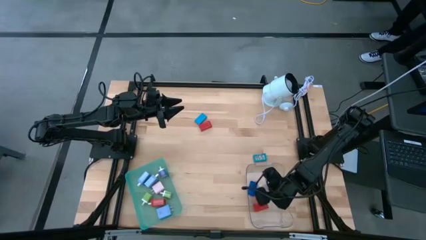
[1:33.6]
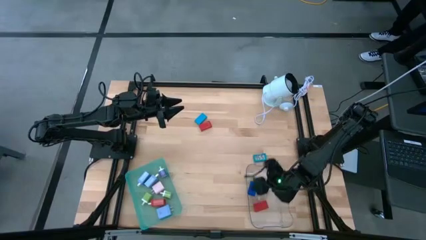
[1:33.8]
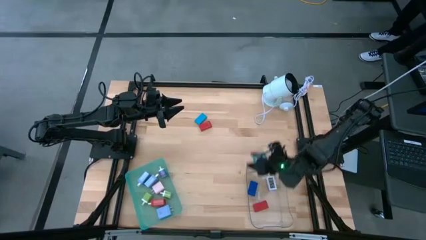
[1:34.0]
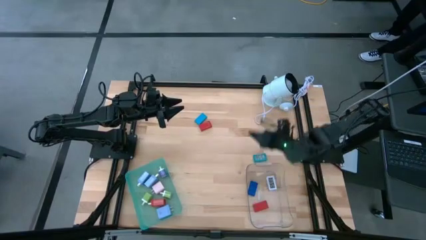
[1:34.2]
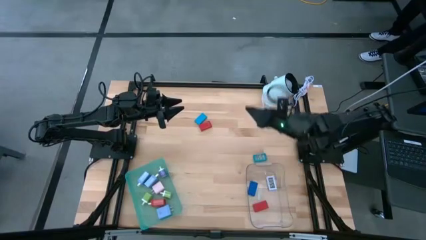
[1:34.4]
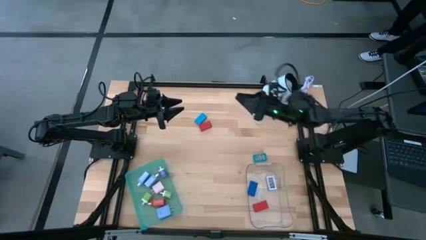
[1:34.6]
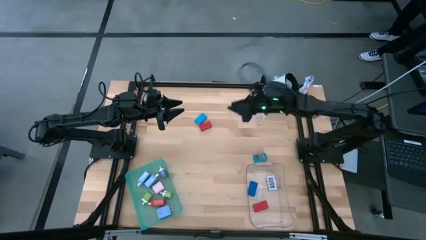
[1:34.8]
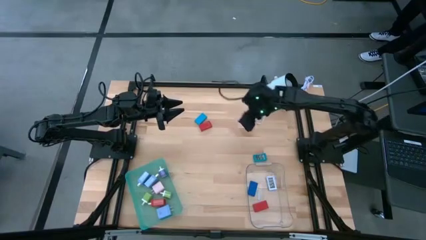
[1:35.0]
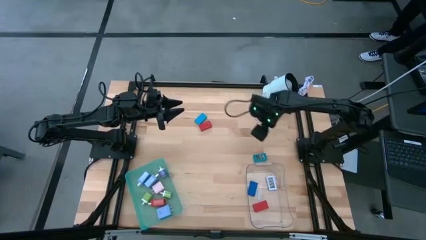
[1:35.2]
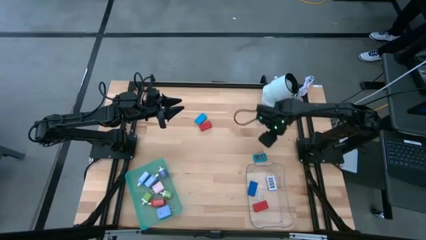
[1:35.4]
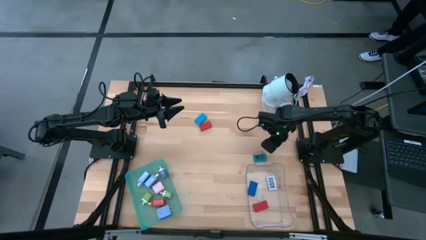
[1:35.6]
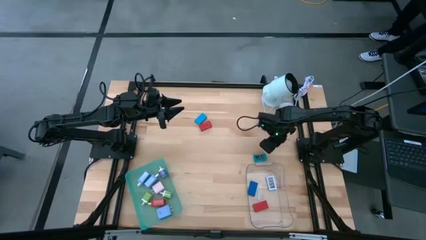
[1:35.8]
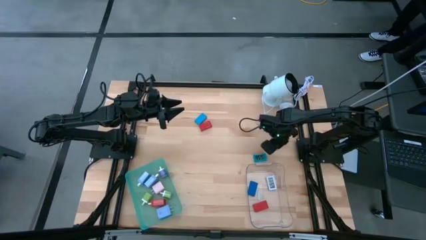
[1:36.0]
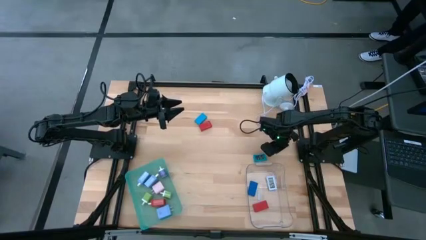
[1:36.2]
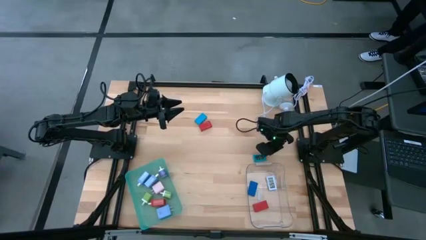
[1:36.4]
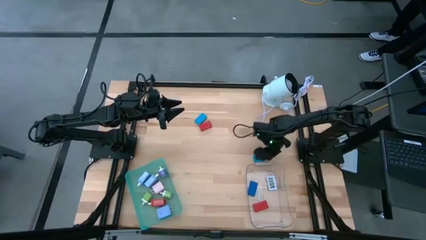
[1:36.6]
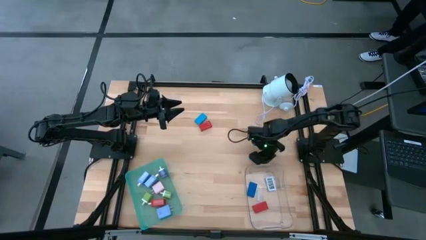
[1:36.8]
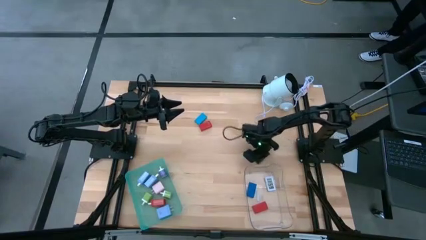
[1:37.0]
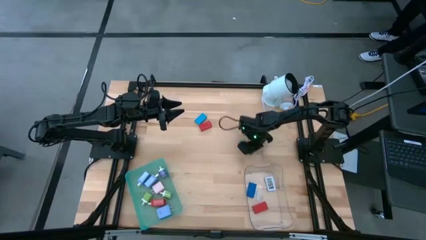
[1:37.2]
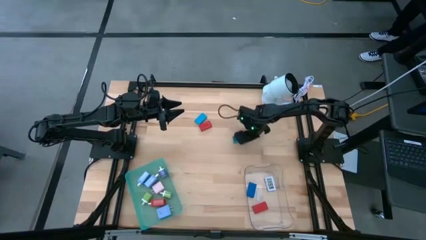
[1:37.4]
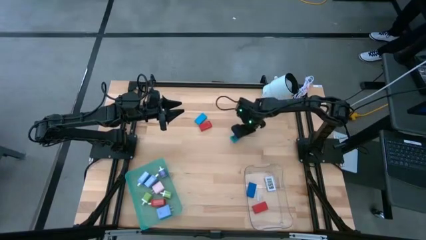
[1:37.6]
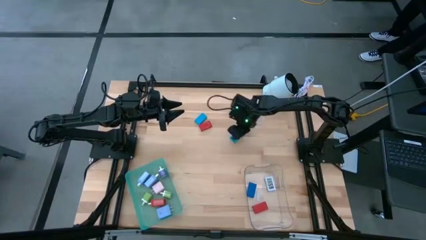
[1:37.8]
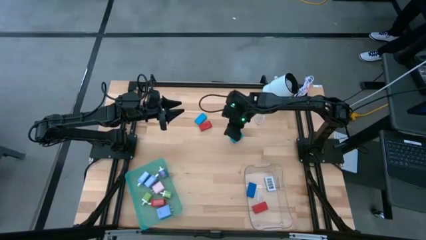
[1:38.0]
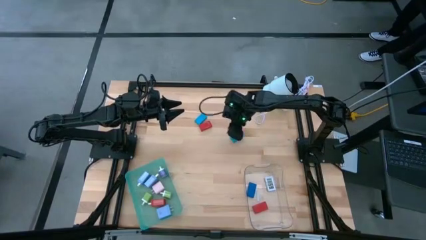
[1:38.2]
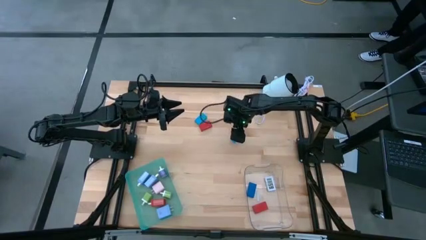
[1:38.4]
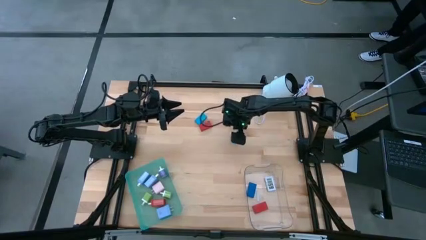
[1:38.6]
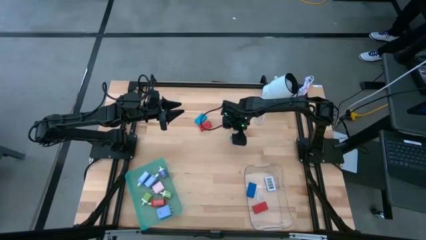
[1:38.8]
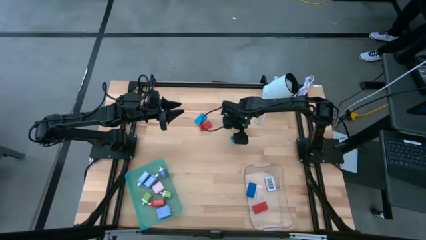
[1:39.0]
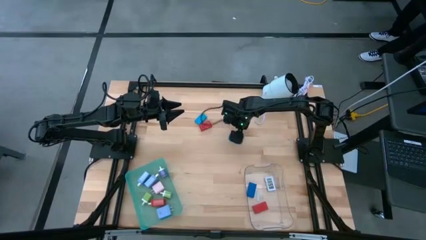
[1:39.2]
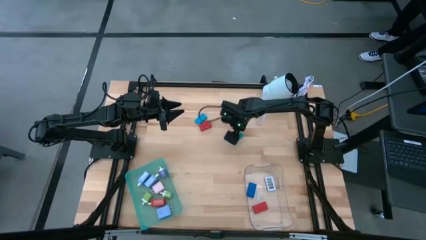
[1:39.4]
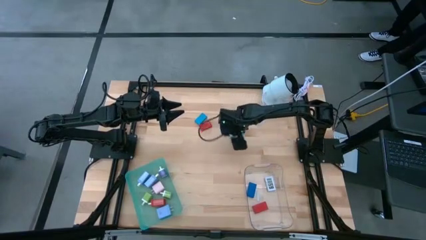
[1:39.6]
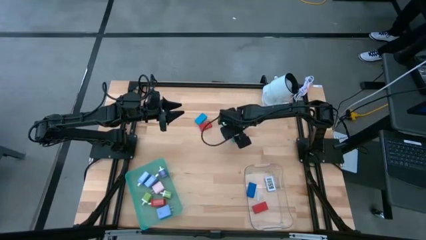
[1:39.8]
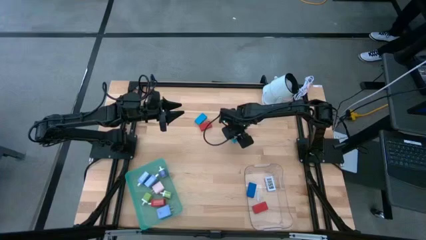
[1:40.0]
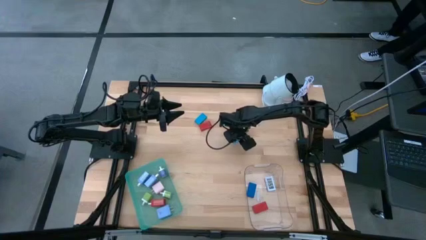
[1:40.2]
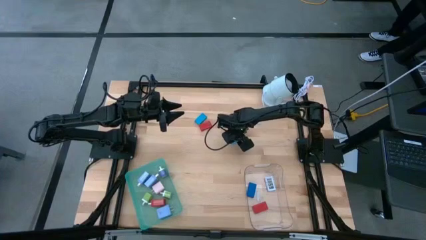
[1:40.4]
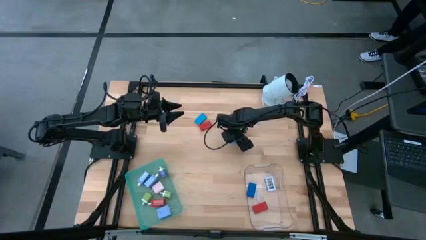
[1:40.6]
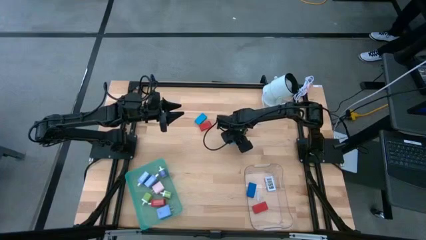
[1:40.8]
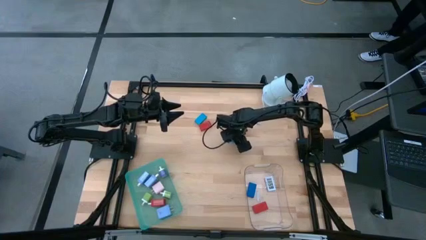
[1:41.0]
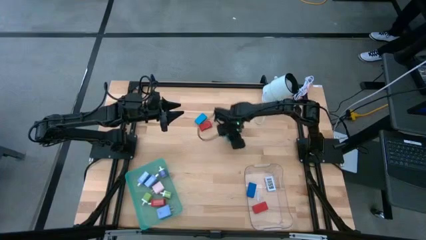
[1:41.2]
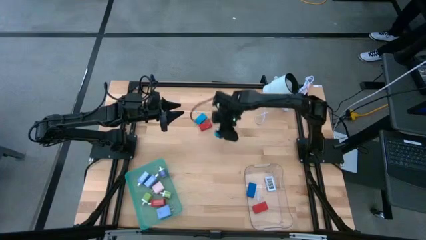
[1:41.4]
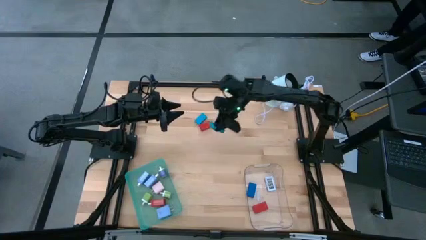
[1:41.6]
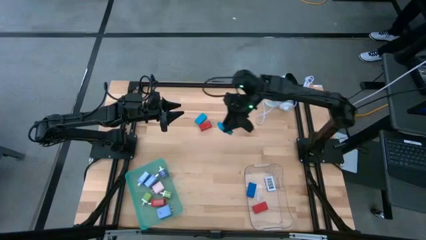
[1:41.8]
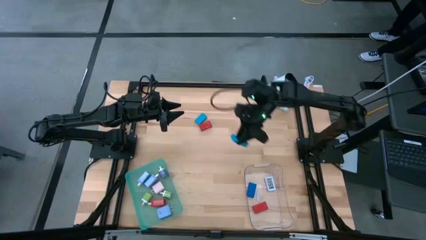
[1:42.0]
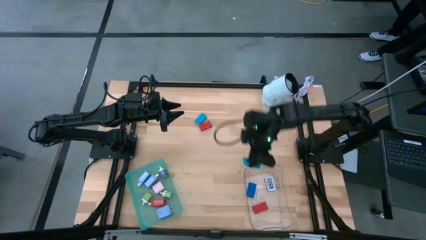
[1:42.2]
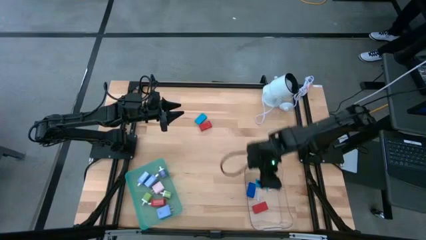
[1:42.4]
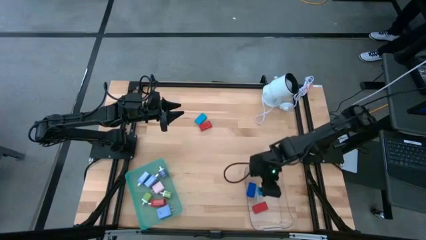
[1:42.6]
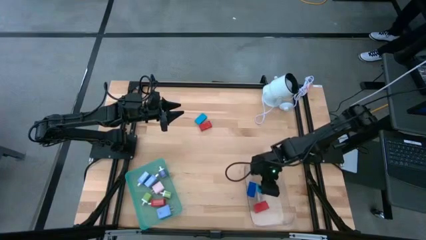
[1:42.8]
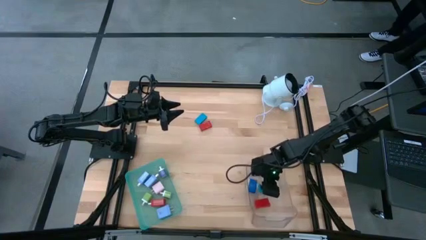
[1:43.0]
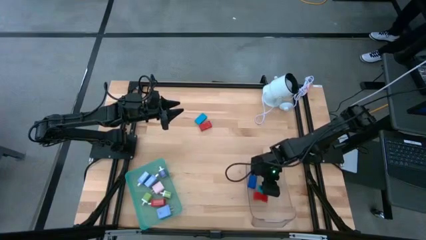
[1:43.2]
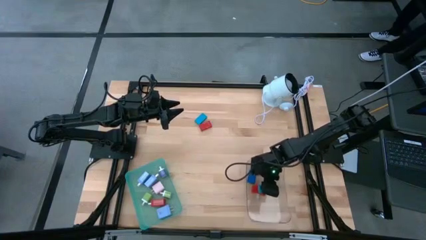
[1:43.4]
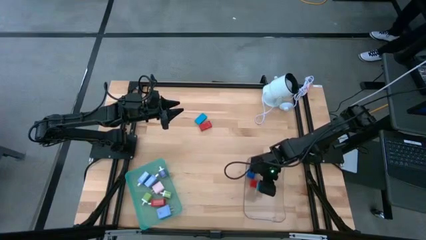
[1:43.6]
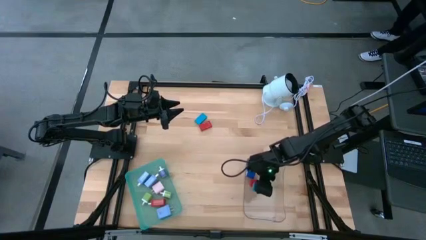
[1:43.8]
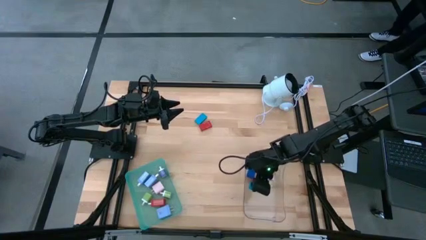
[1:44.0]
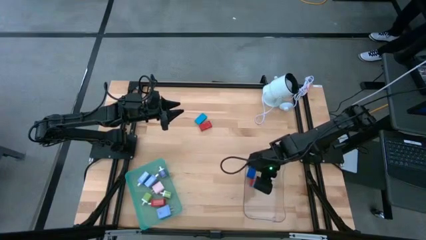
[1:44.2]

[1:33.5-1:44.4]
Task: Pick & Place Office items
Put the bottom light blue digital clock into the transparent bin

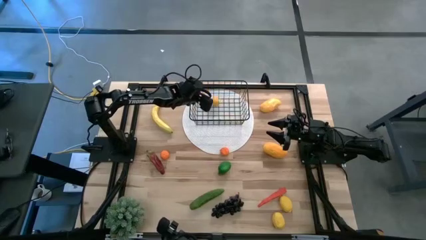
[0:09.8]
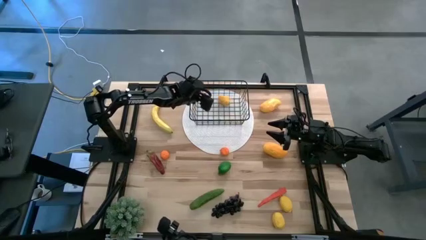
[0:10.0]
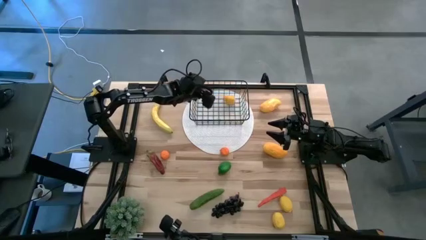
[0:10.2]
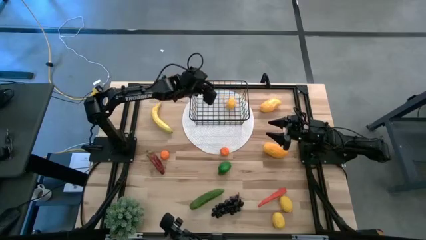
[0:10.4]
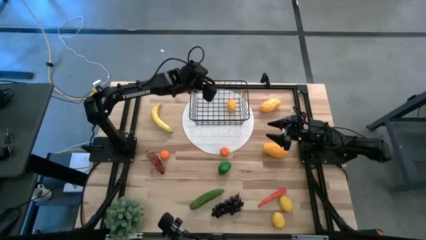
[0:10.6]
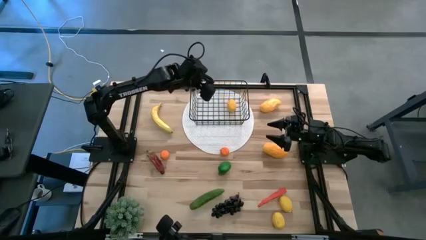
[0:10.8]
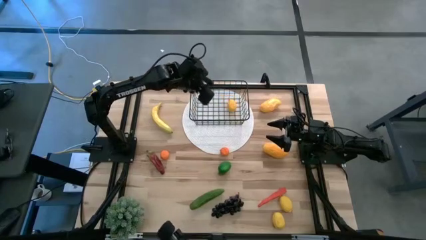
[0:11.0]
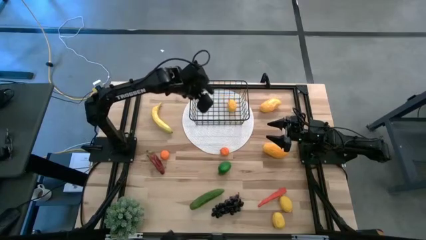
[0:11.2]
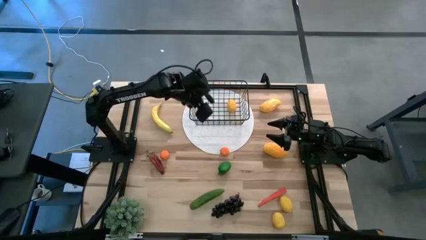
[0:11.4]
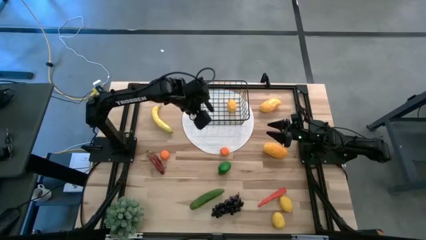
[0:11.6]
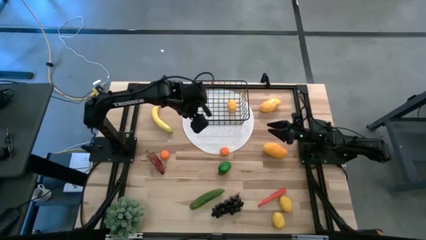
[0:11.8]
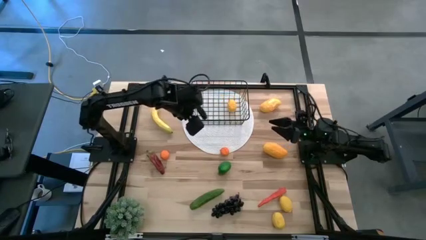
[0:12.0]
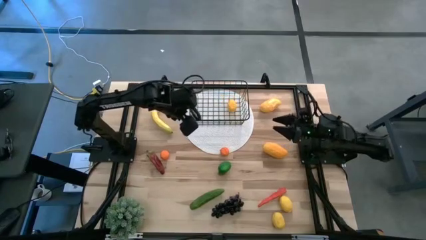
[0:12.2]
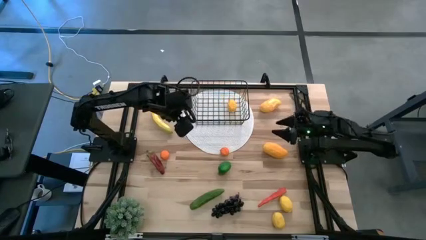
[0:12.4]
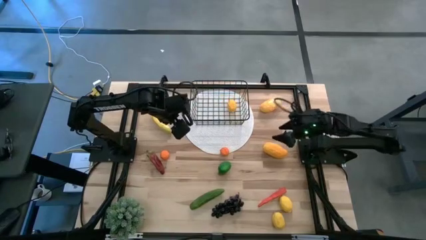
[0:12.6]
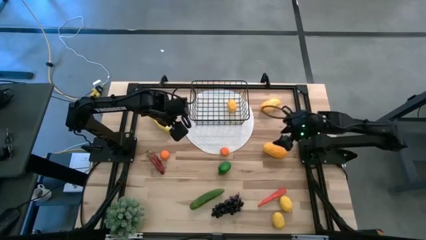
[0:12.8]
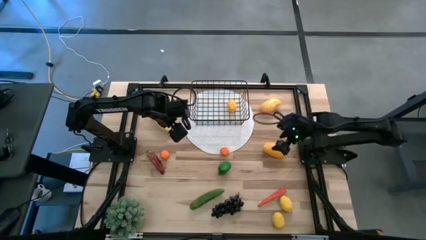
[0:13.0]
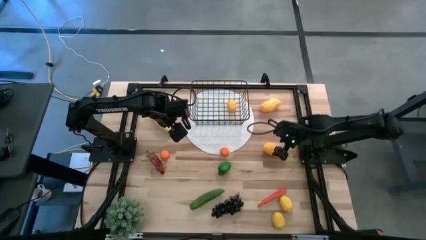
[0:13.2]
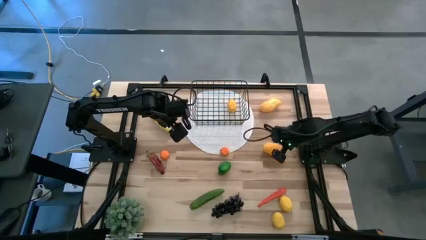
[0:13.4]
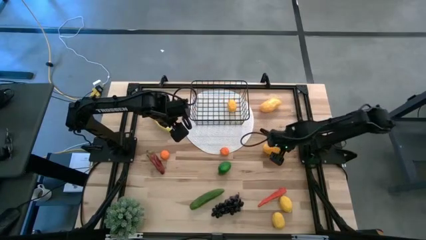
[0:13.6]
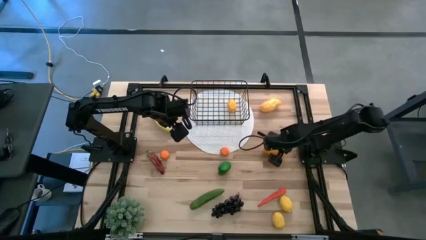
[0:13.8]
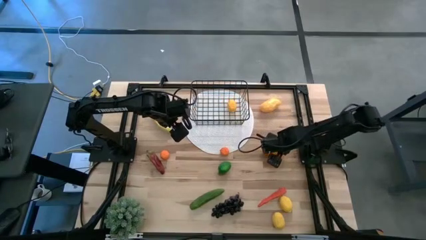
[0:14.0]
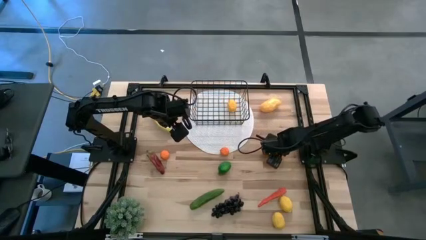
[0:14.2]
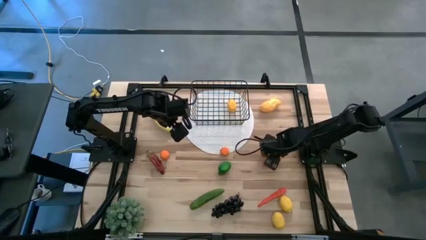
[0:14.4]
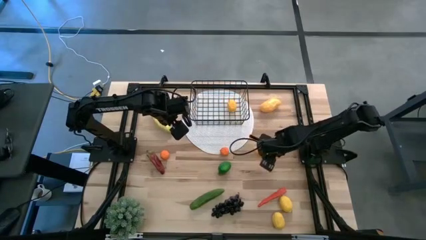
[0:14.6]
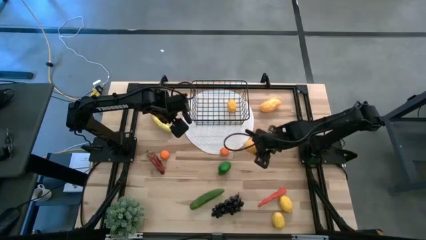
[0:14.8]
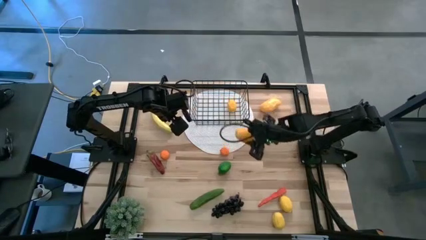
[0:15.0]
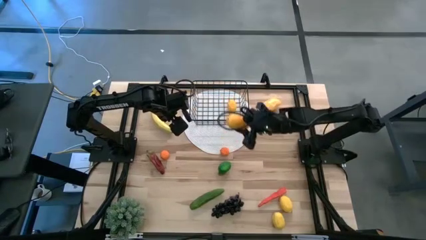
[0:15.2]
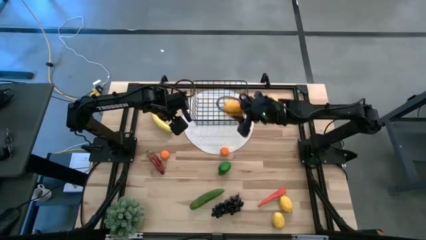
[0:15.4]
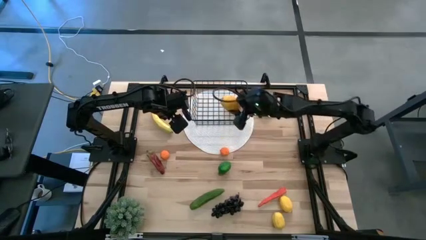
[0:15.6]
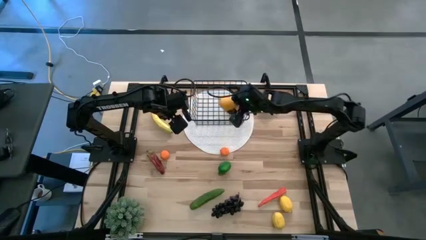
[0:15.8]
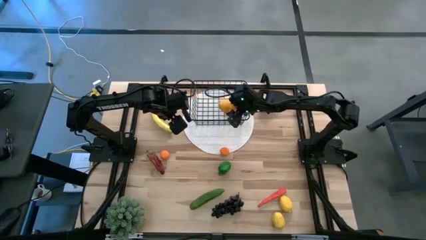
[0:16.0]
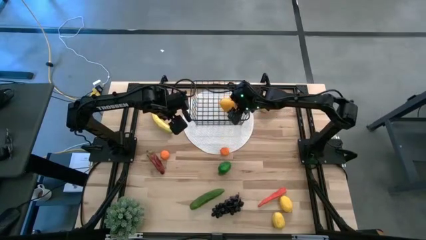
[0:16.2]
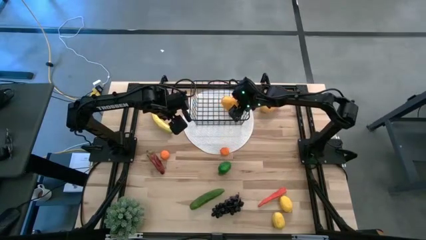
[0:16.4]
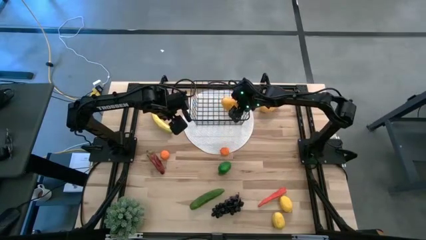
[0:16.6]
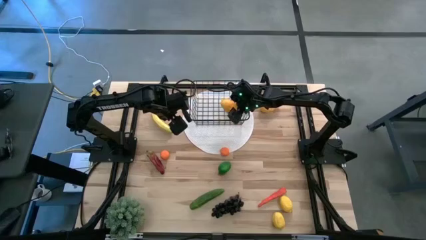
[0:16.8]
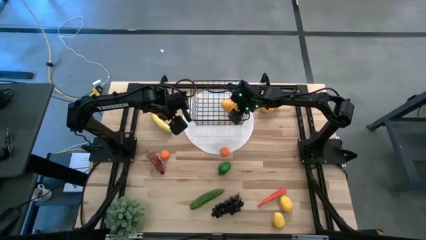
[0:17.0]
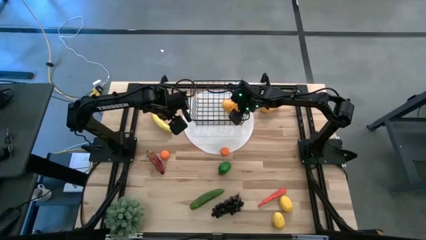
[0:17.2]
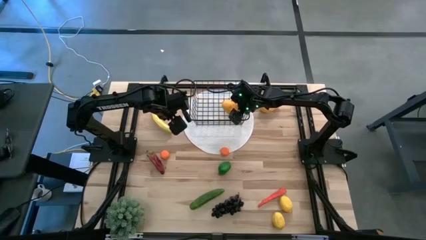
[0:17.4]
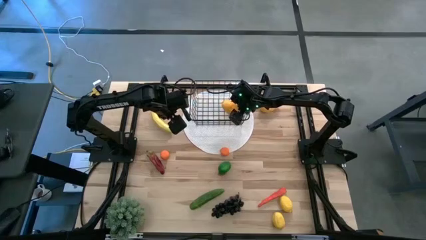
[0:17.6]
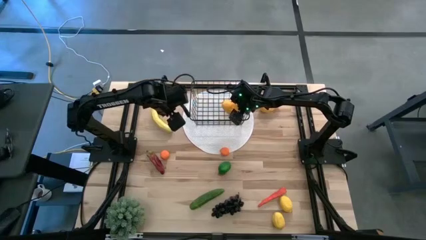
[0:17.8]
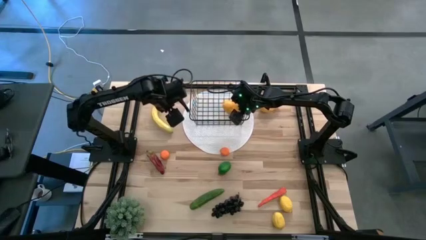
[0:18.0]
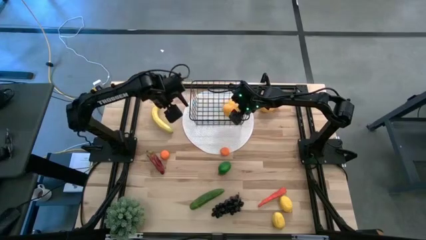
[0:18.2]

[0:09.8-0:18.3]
Task: Build produce basket
Put the bottom mango into the wire basket
